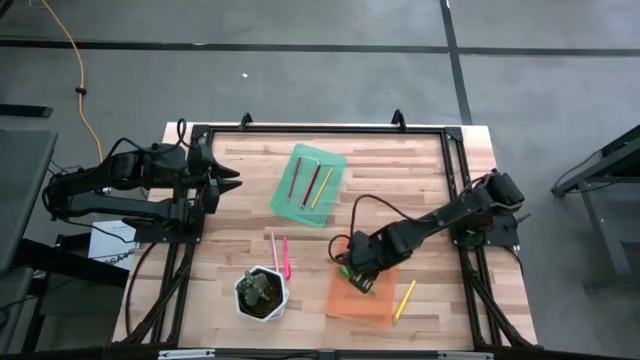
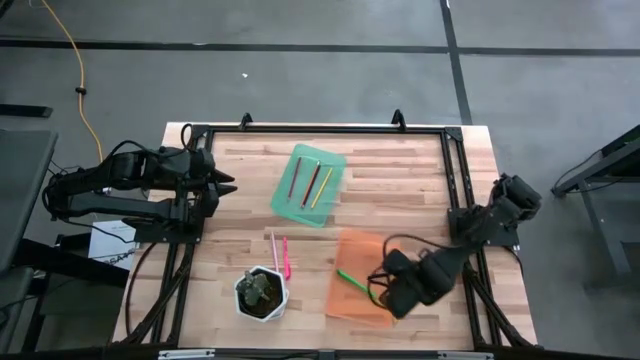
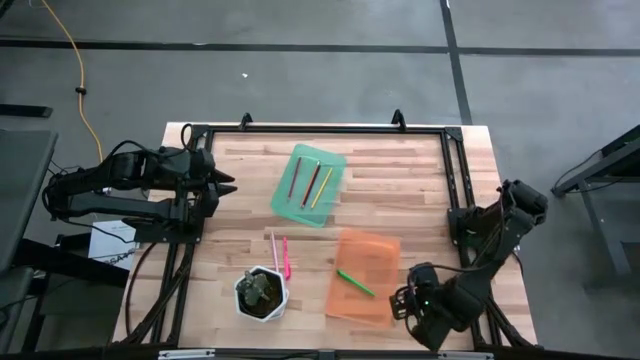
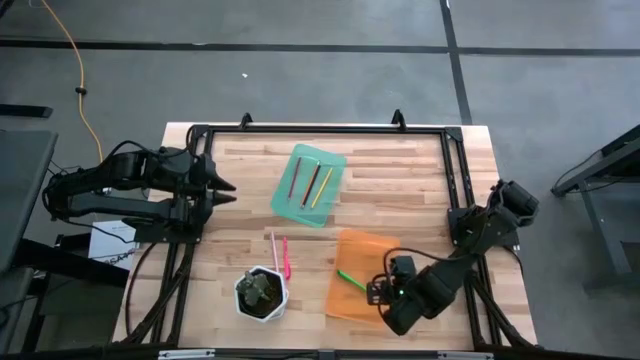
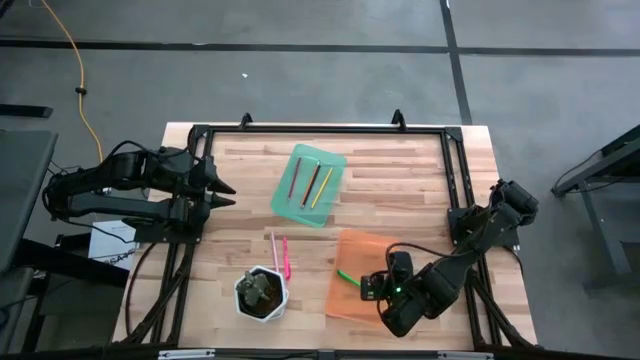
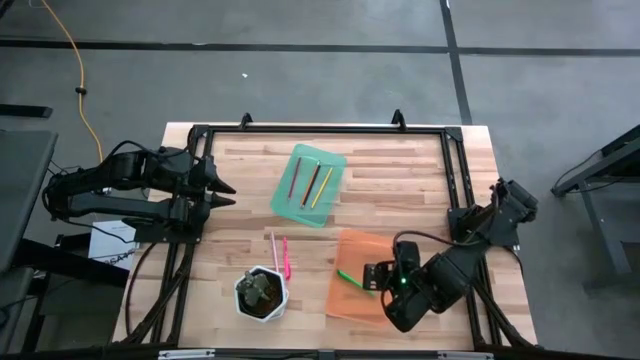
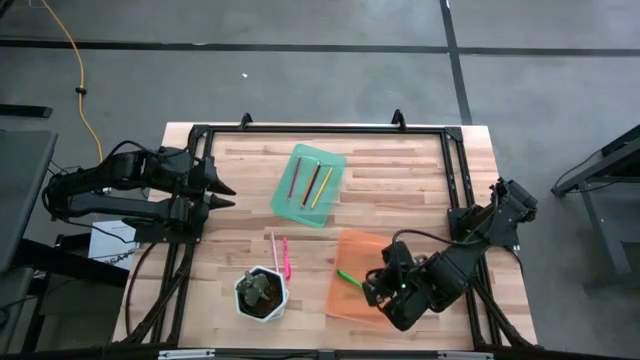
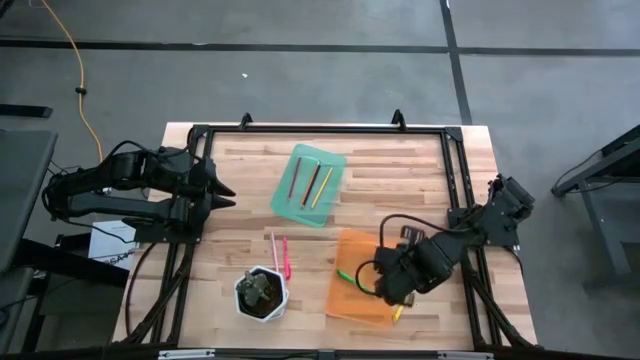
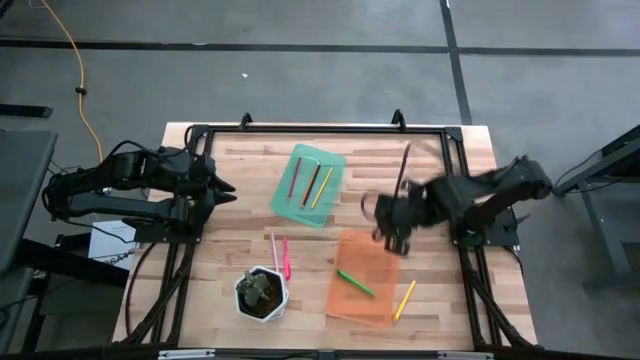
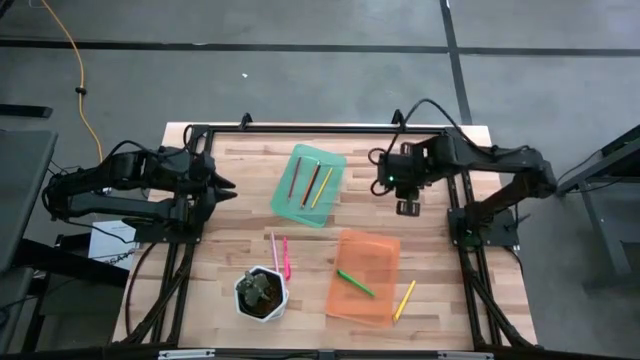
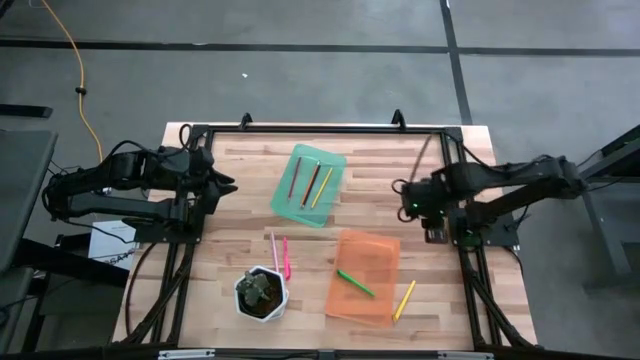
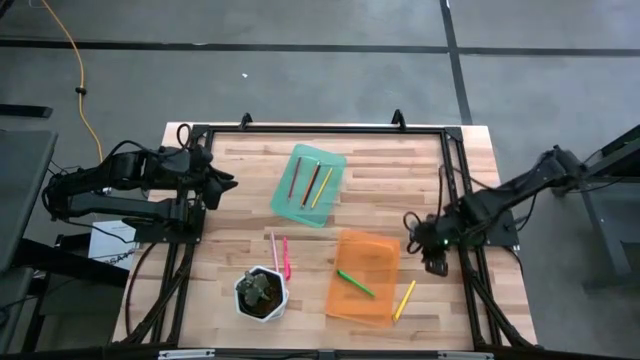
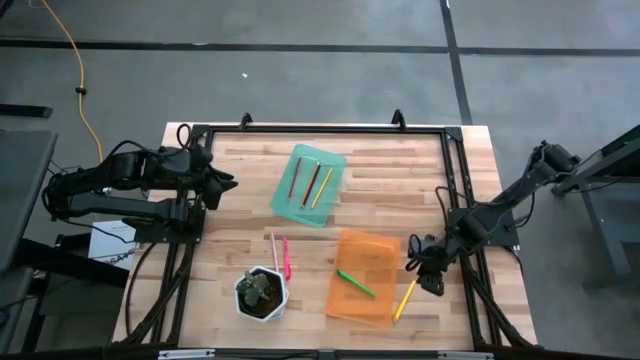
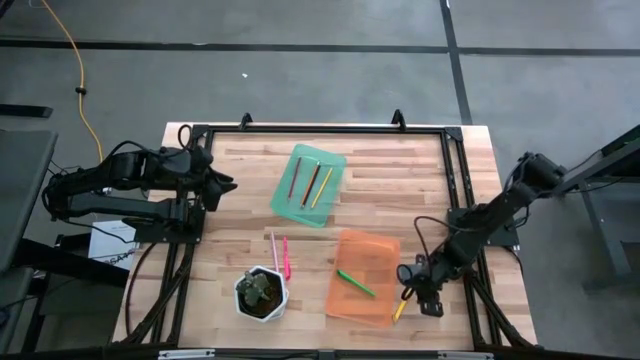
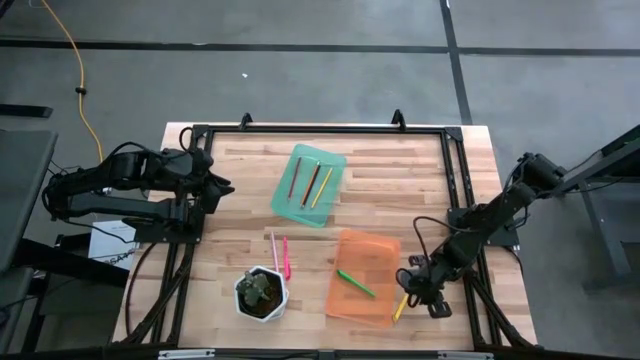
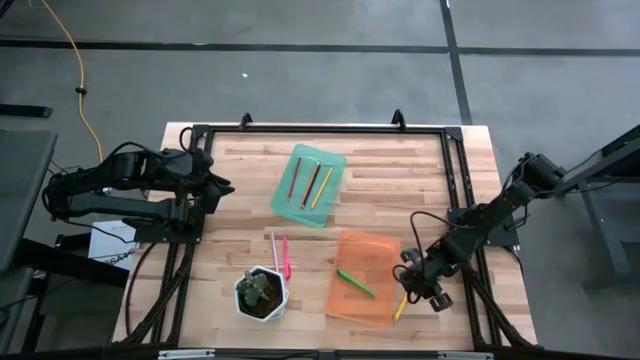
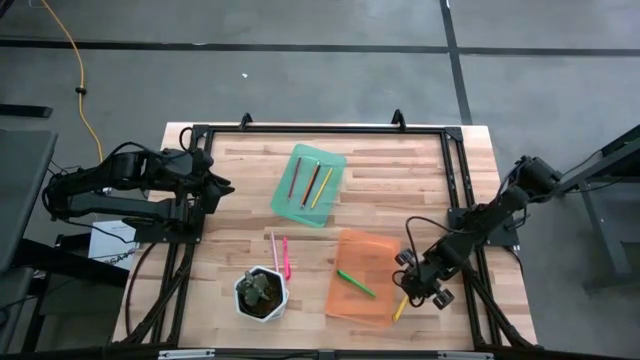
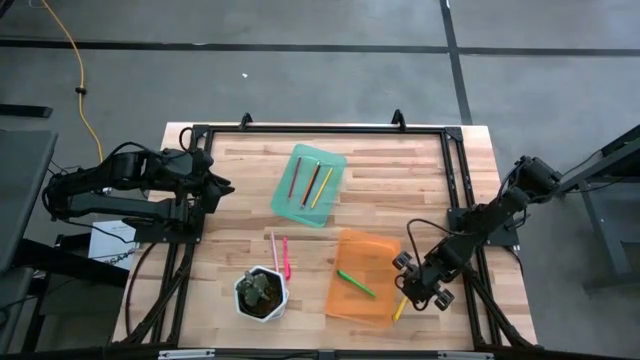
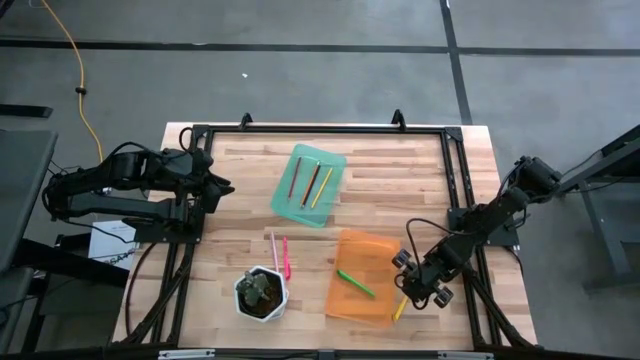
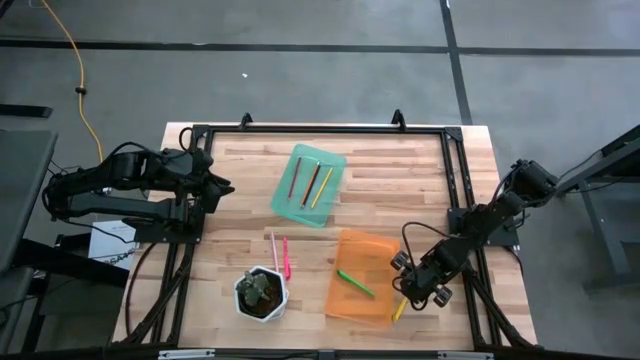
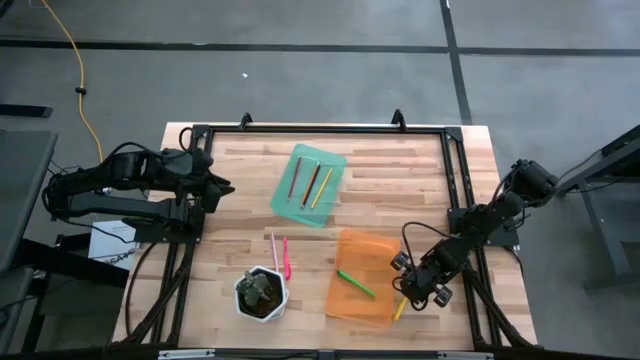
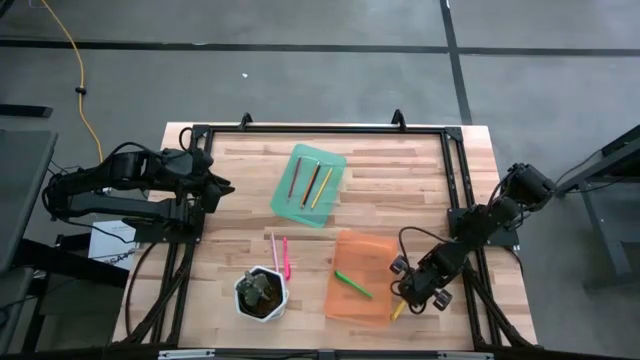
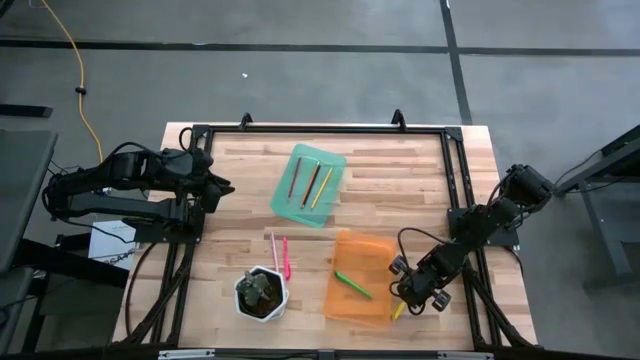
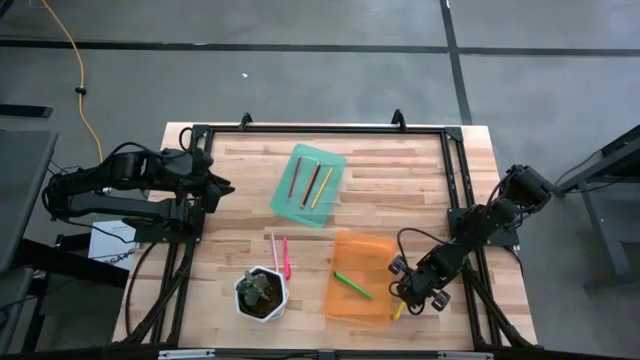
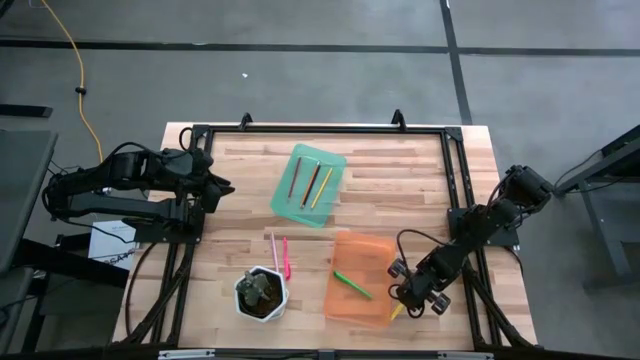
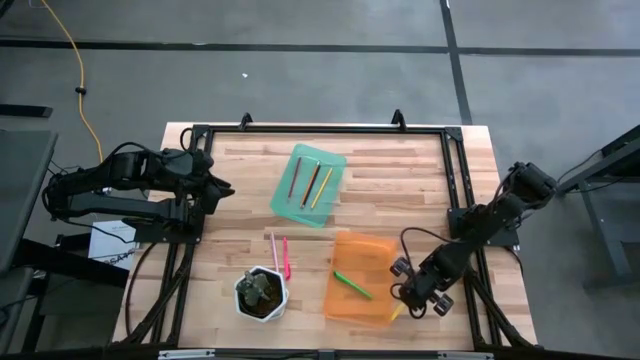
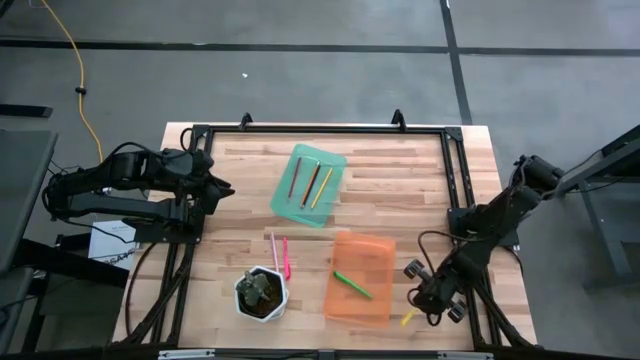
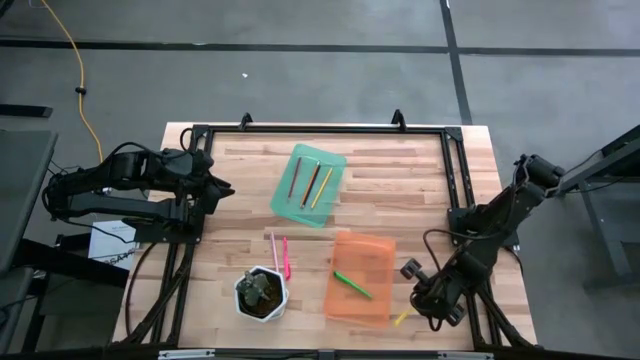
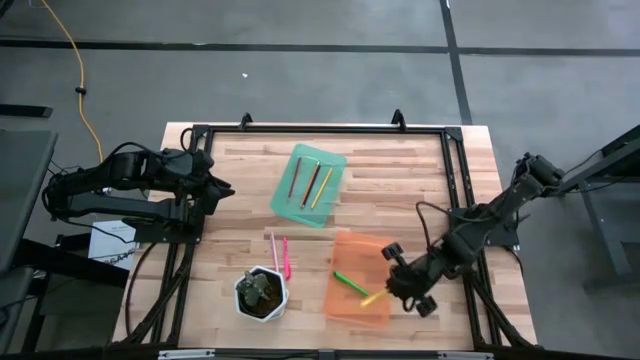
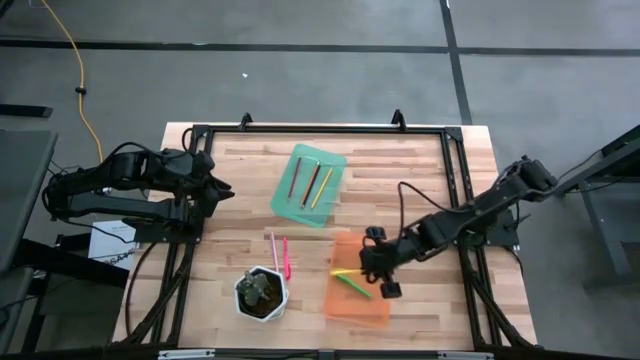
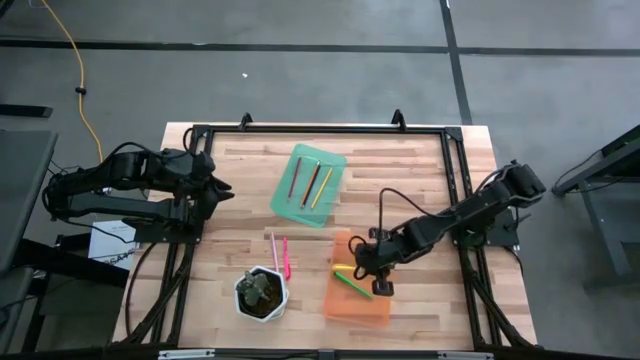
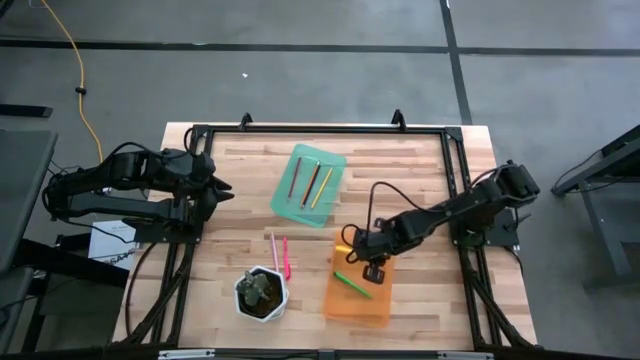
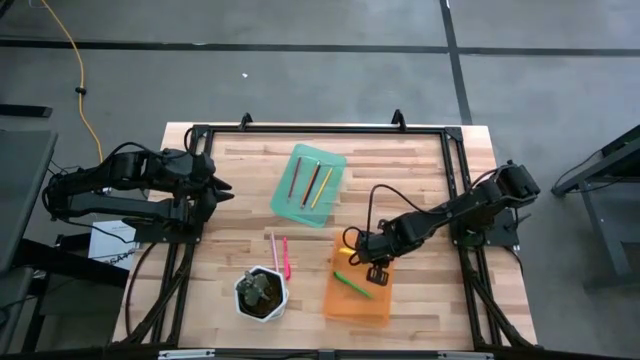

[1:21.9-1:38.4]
Task: Sort pens & pencils
Put the yellow pen into the orange bin

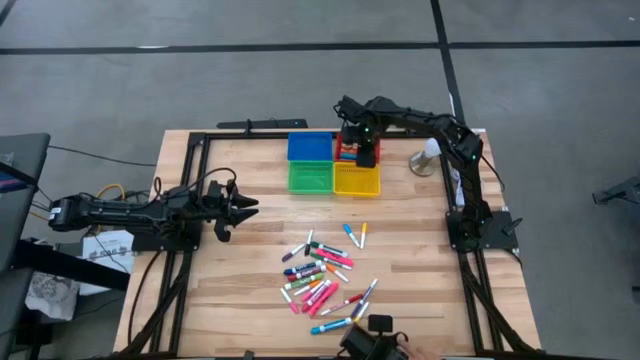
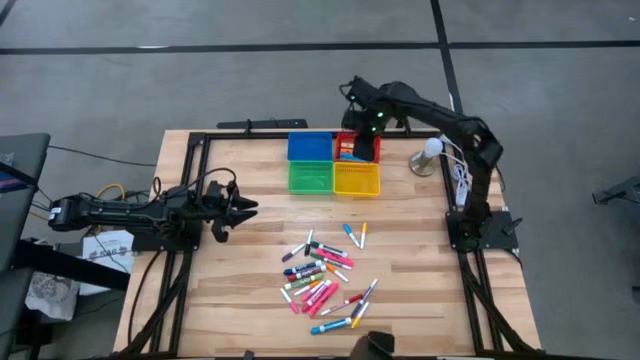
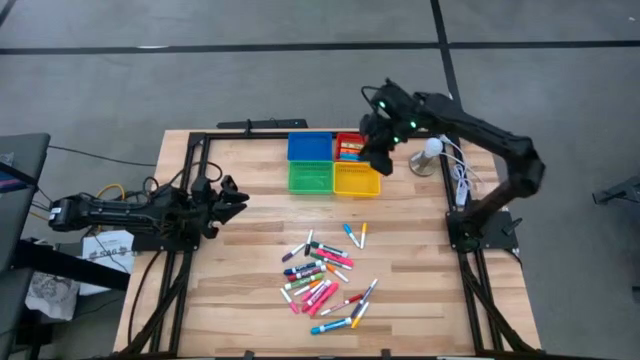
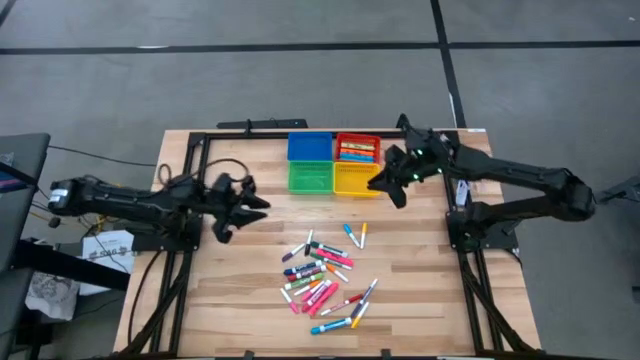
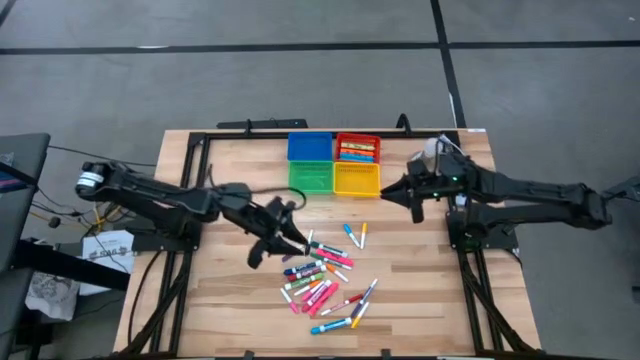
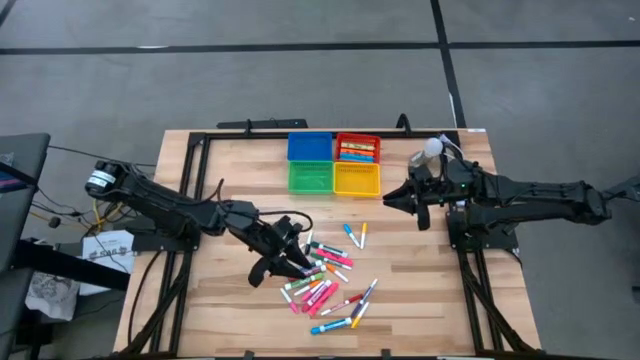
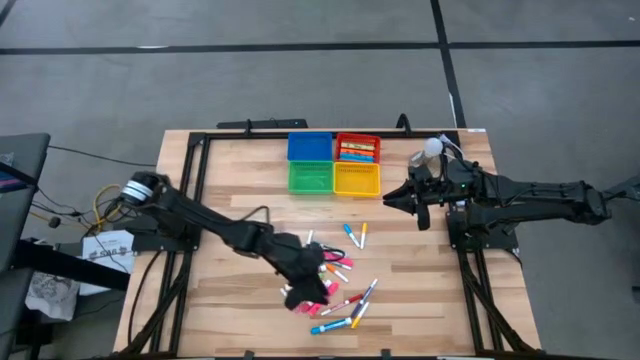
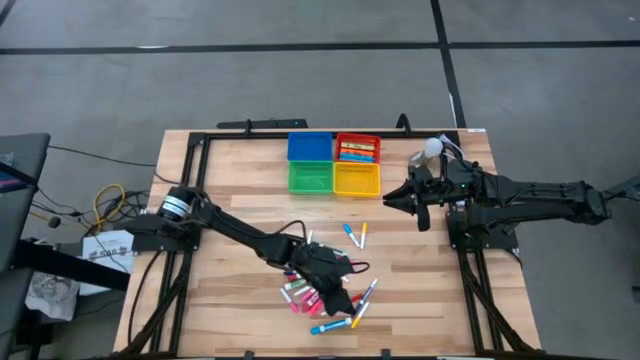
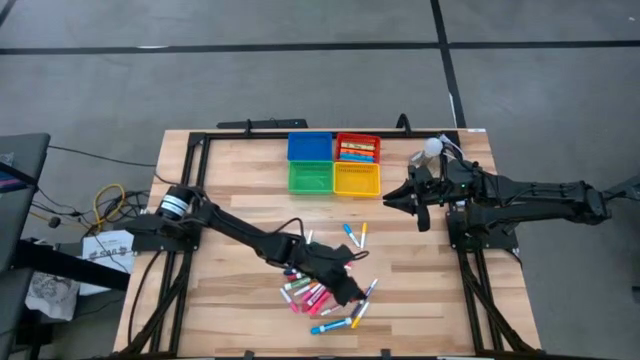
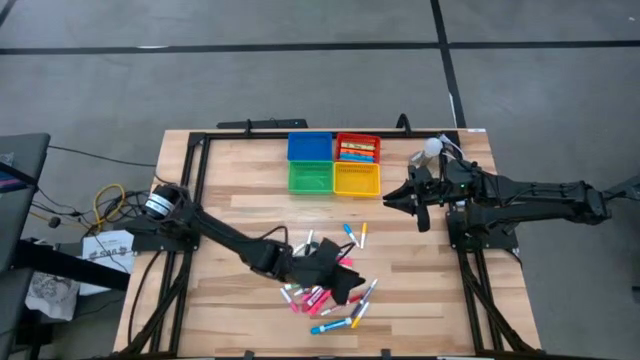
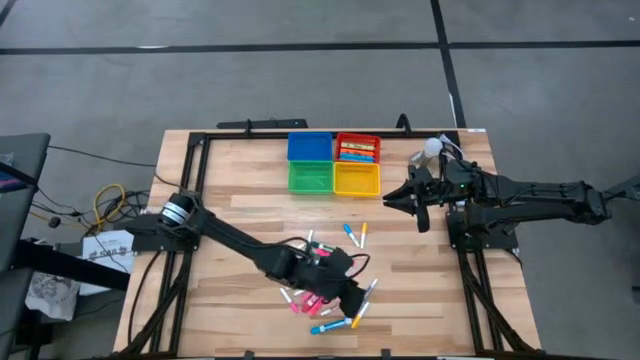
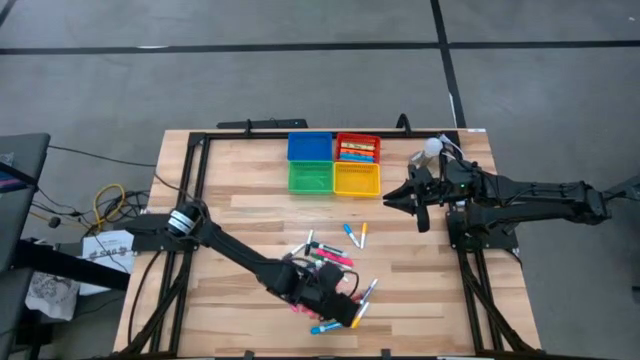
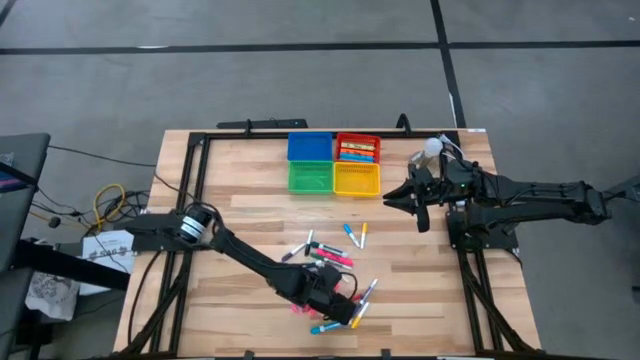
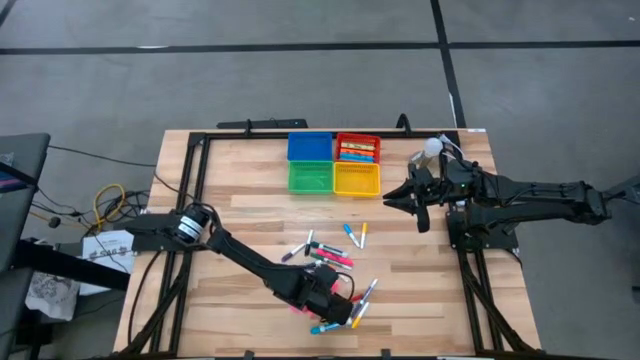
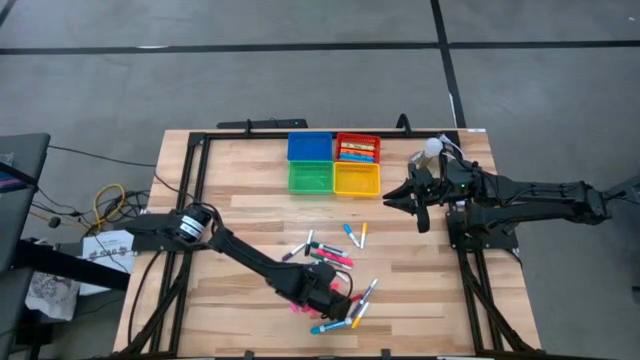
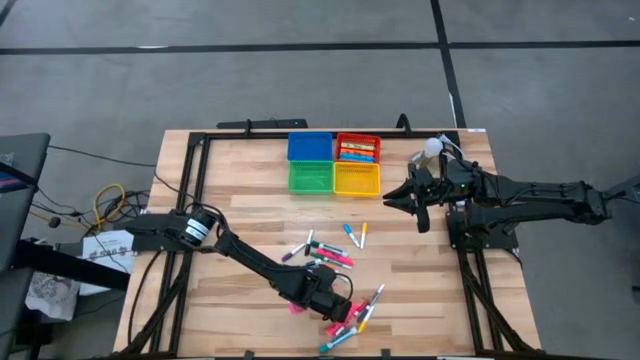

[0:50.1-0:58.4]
Task: Pick & Place Markers
Put the pink marker in the red bin
